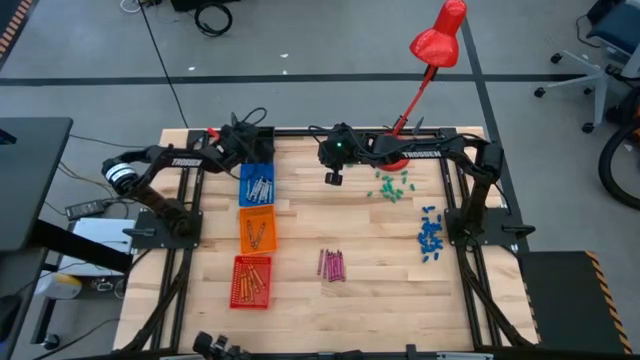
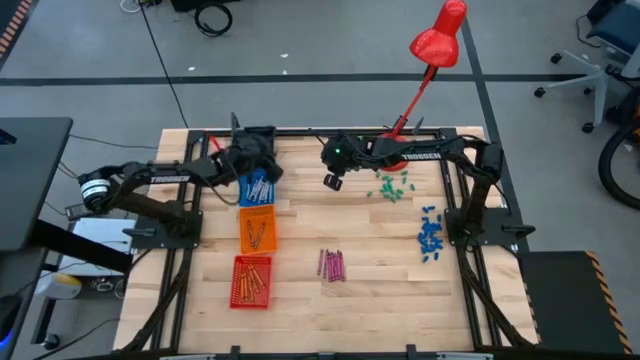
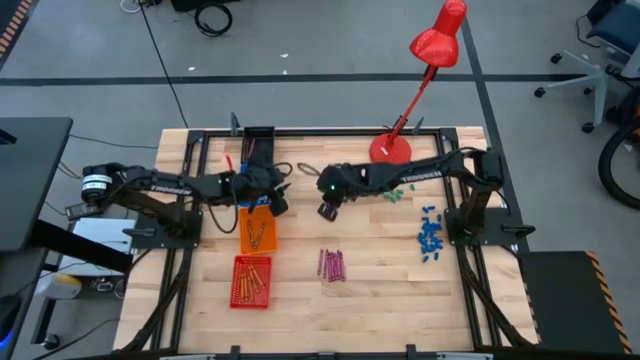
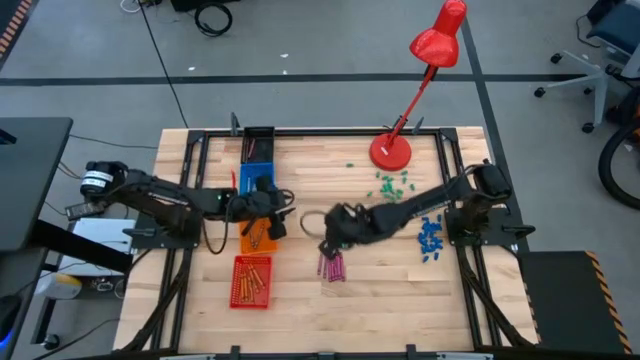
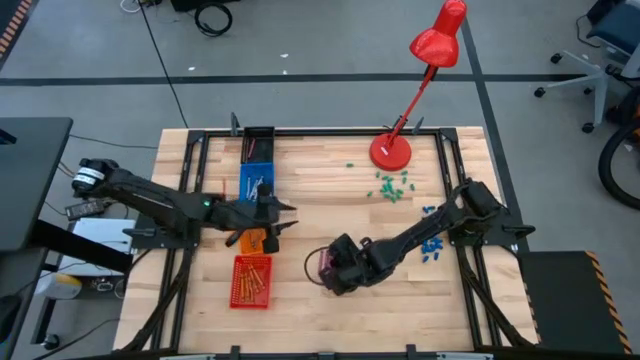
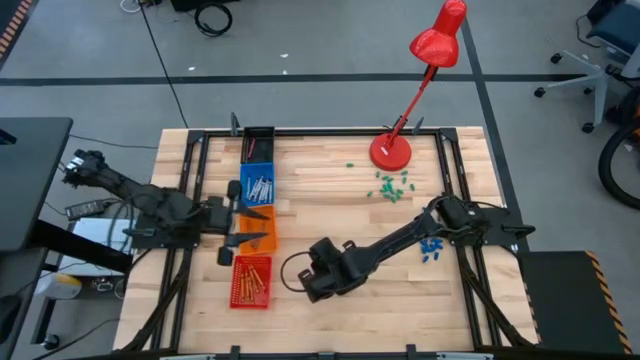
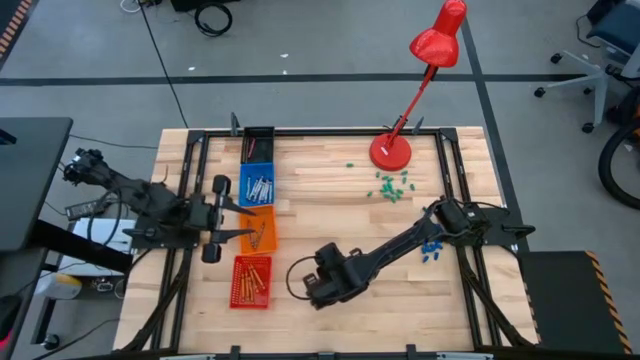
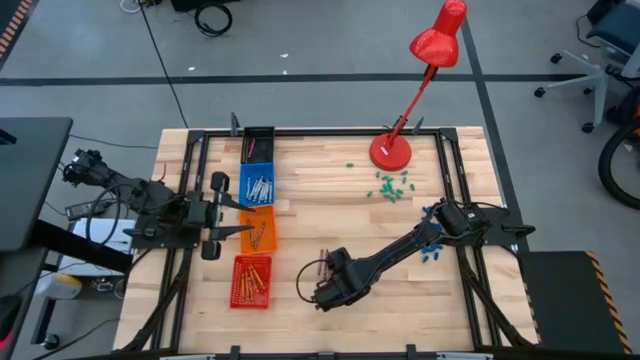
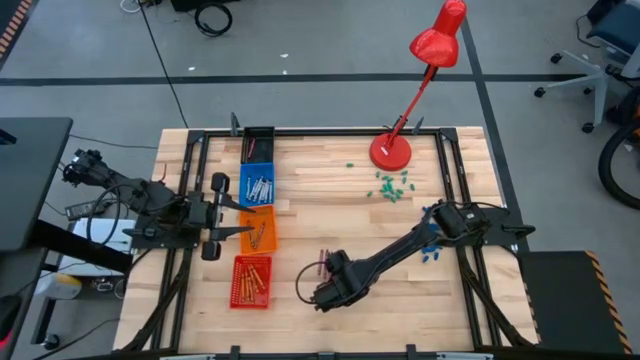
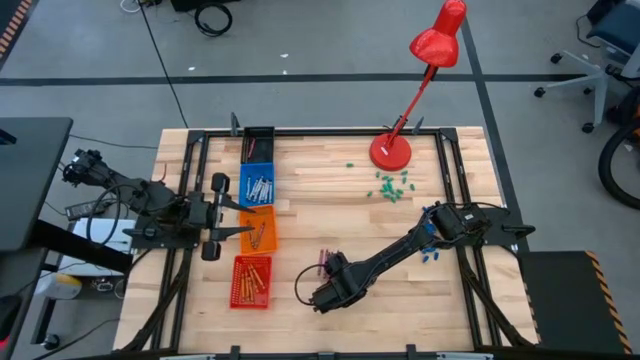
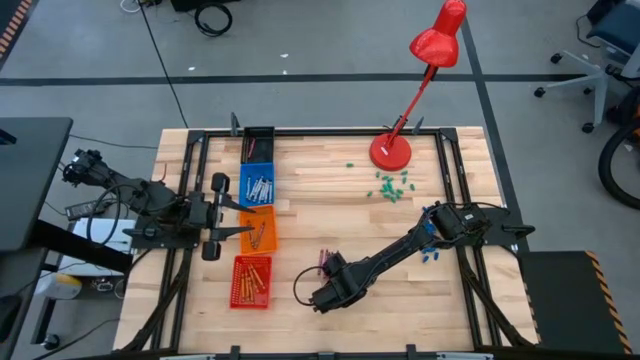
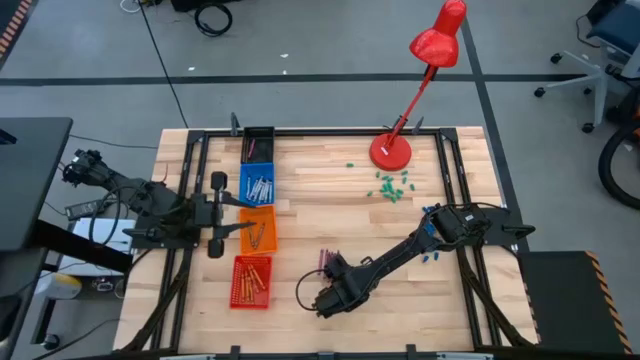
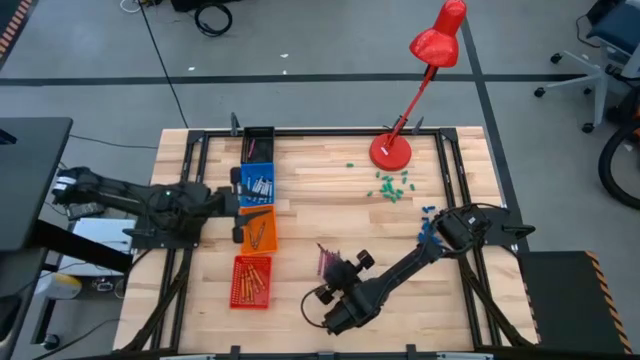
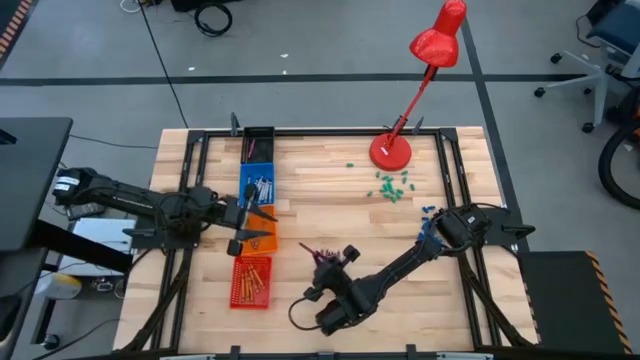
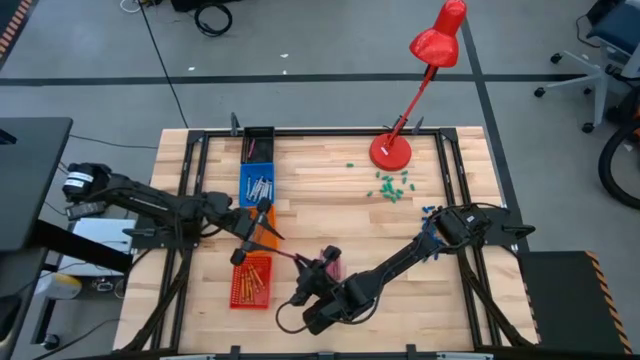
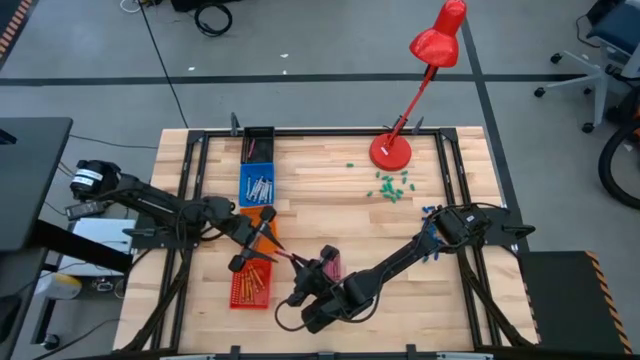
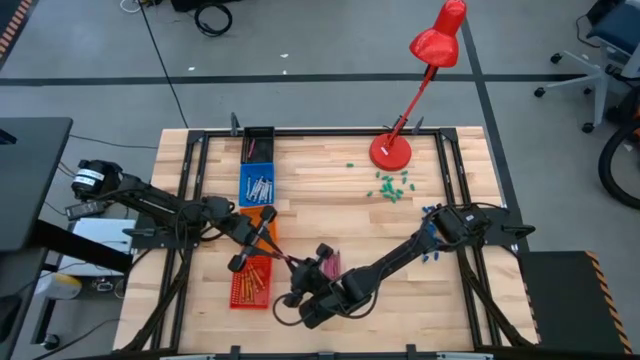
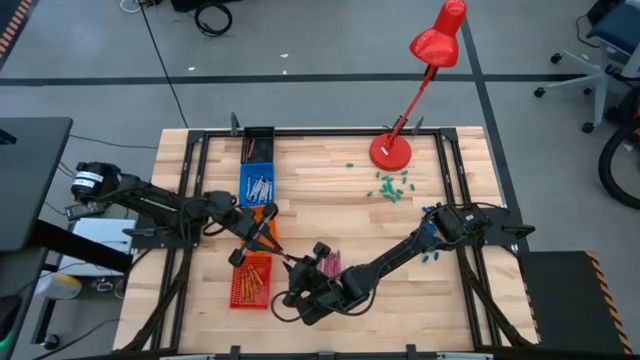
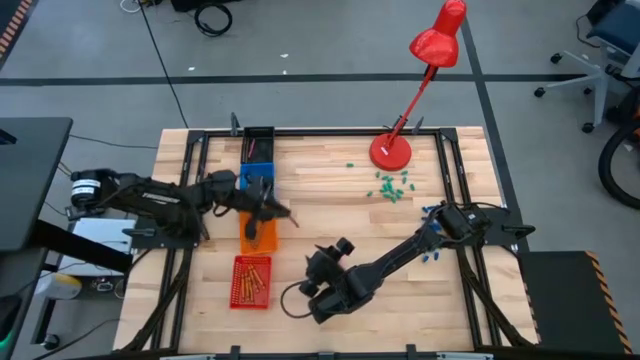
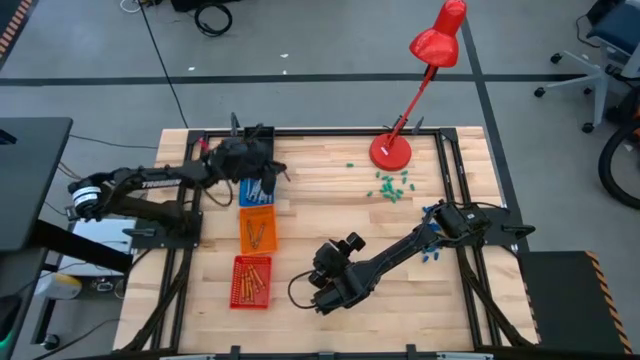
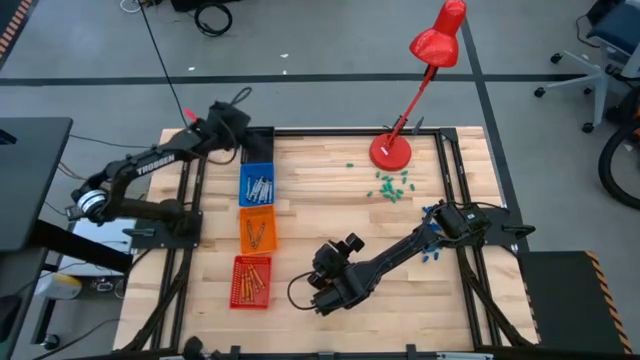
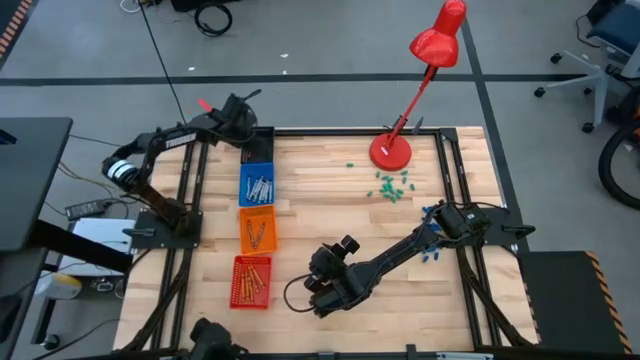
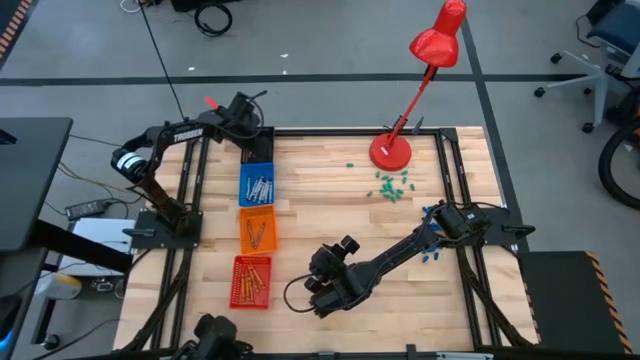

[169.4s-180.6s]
Task: Sort crayons
Put the pink crayon into the black bin

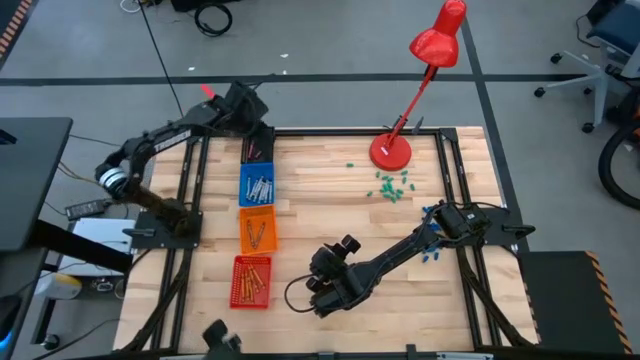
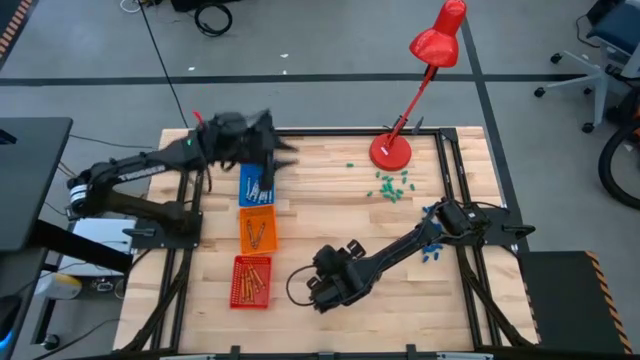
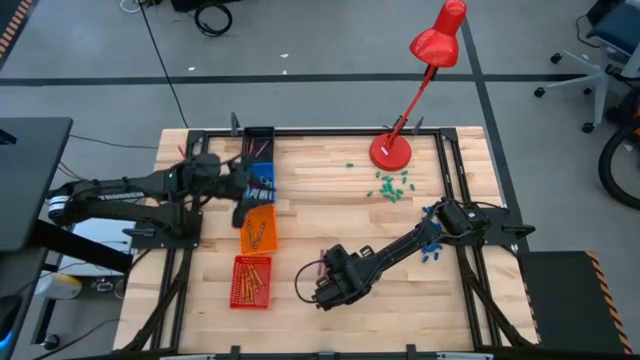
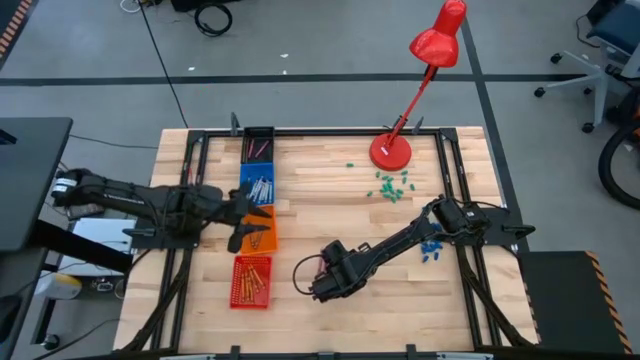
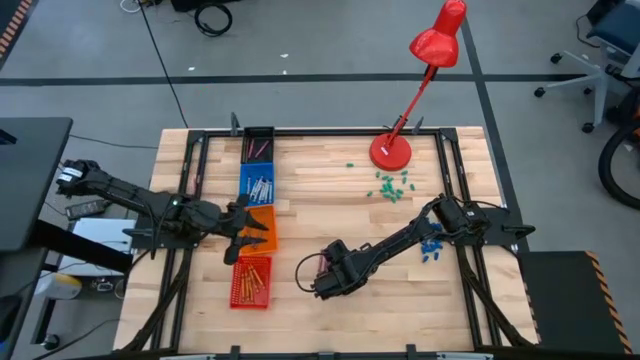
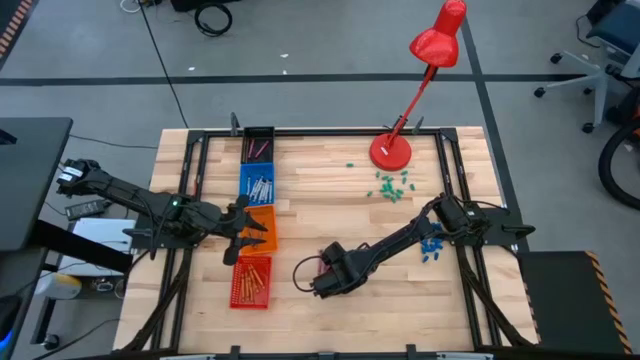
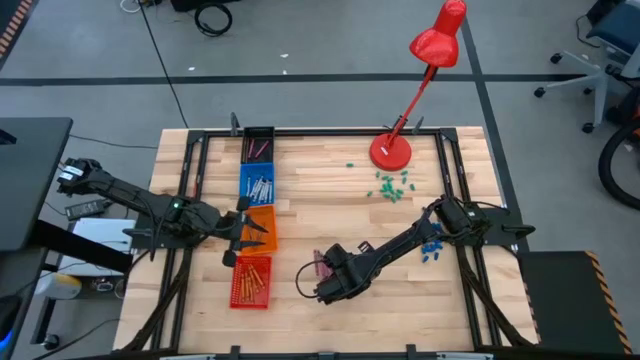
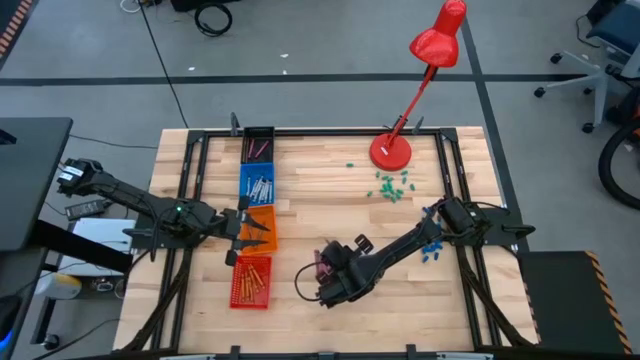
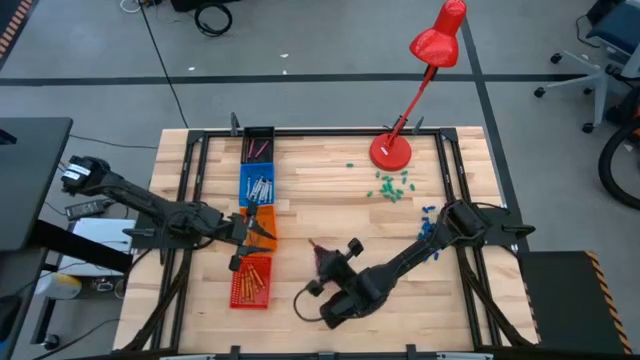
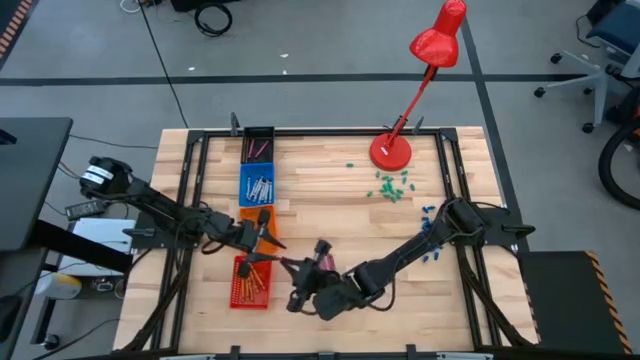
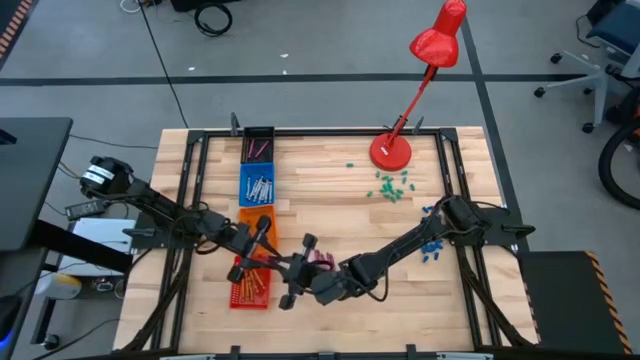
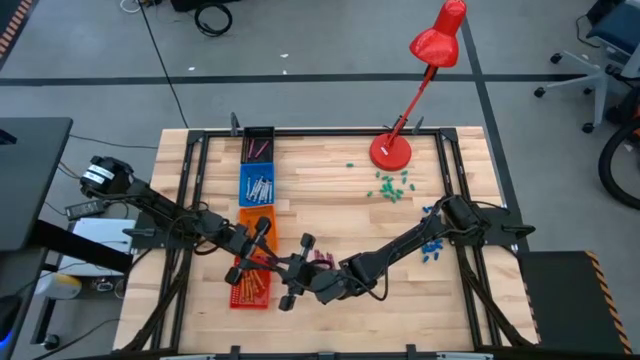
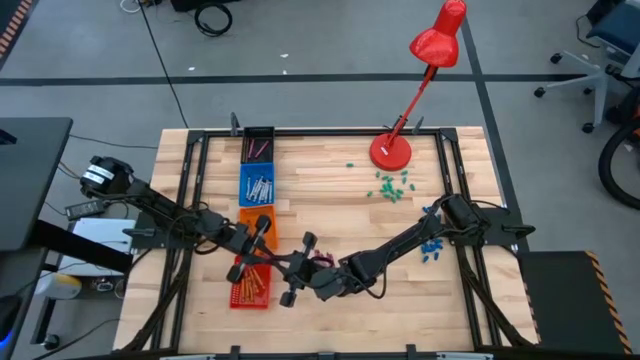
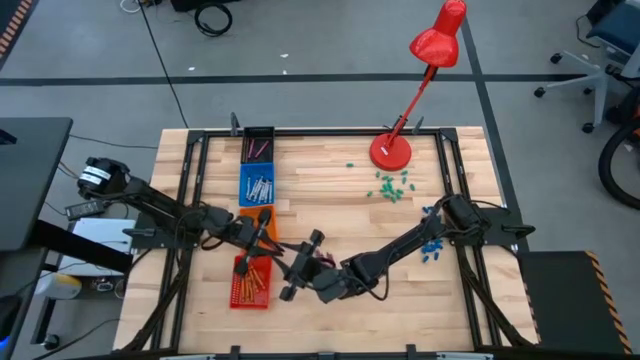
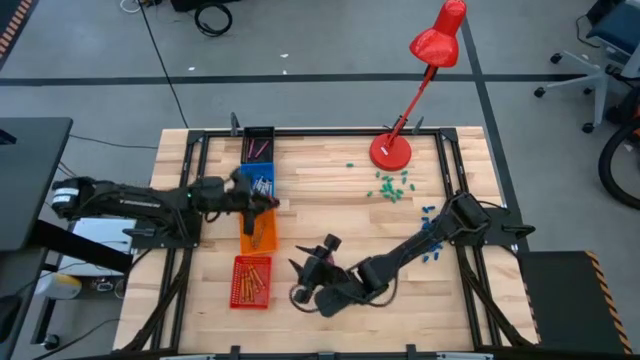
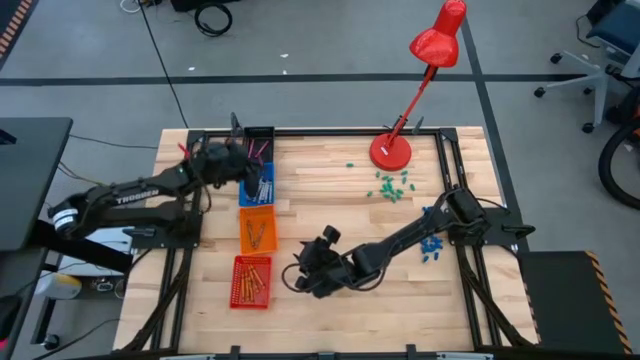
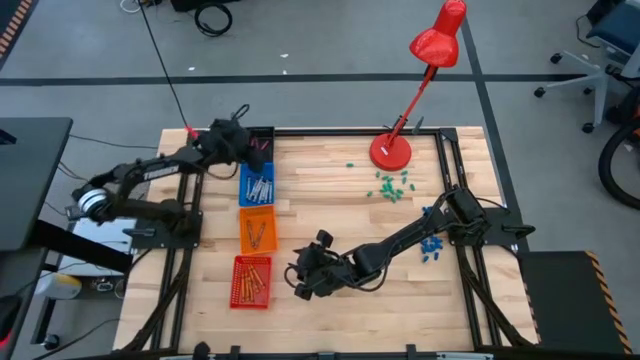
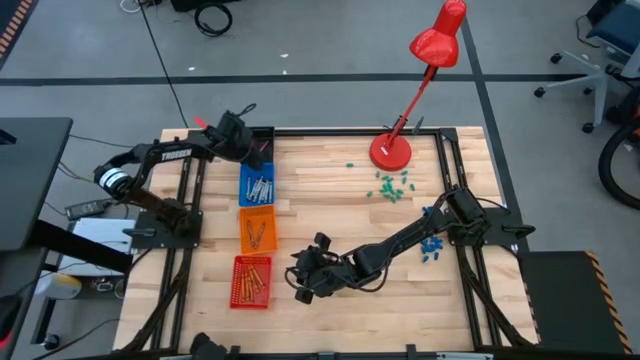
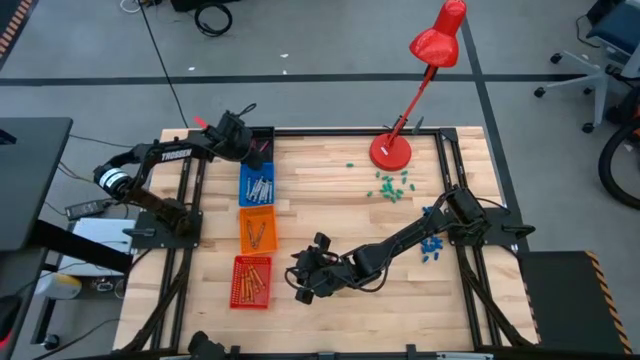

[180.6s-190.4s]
Put the pink crayon into the black bin
